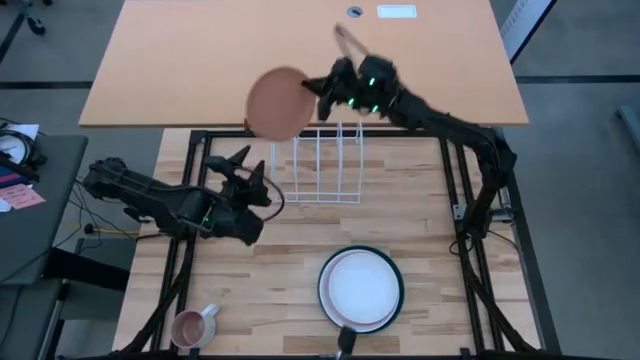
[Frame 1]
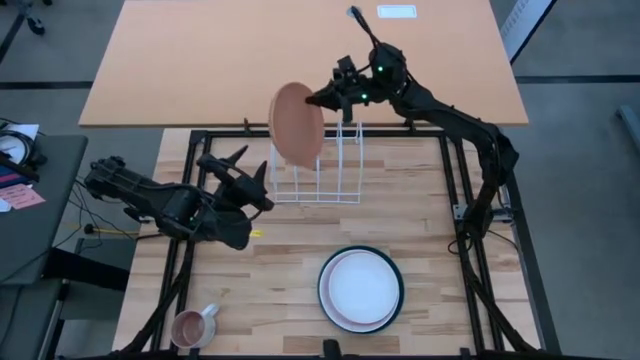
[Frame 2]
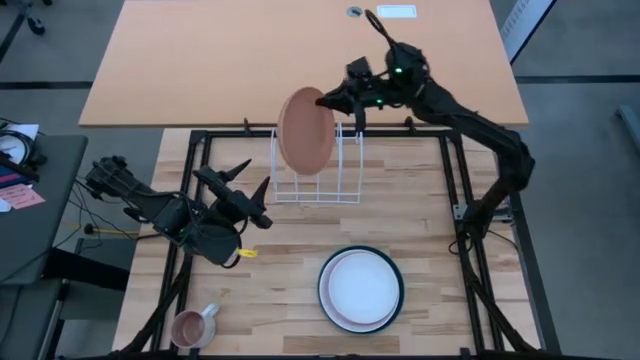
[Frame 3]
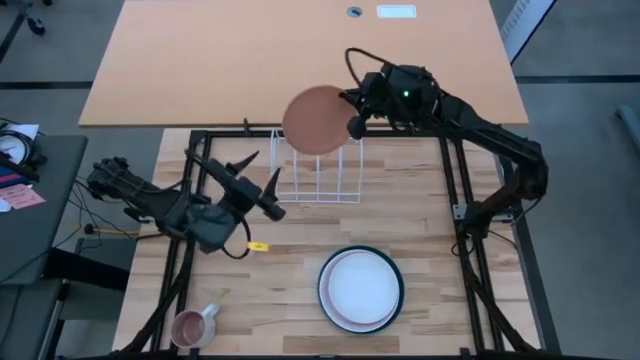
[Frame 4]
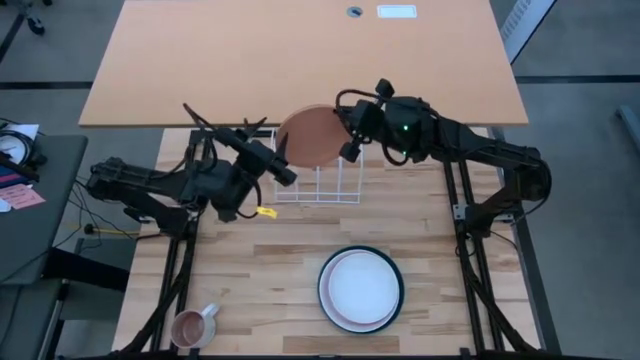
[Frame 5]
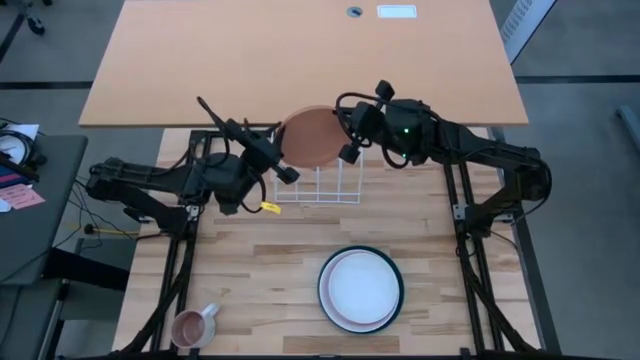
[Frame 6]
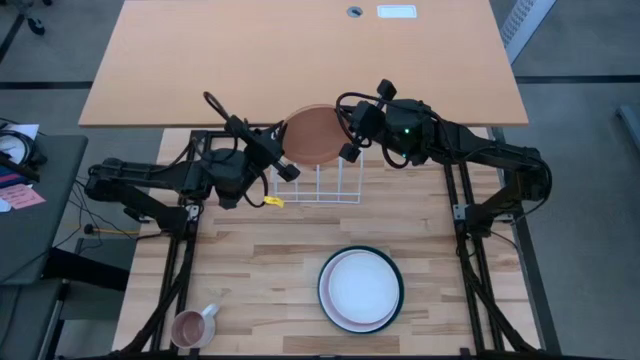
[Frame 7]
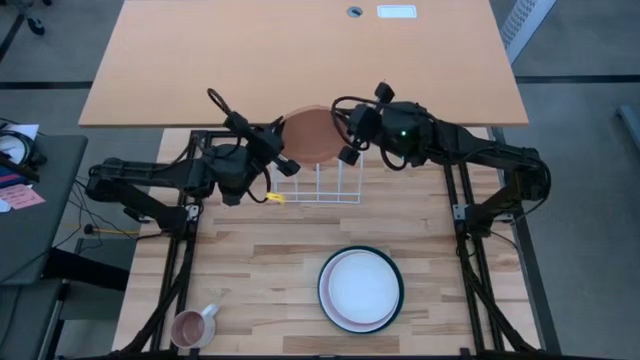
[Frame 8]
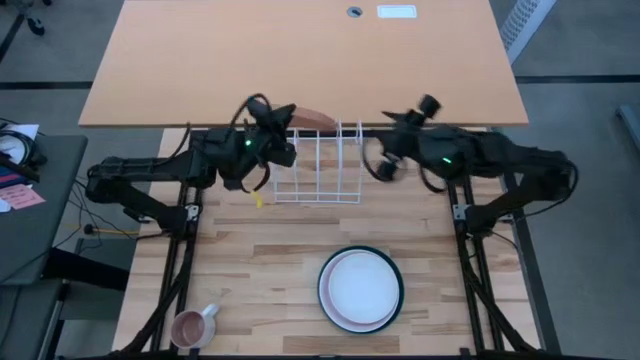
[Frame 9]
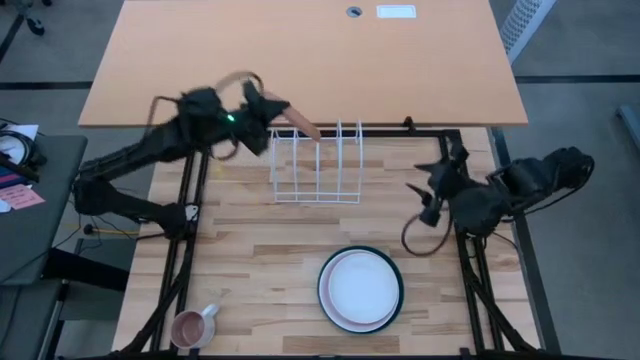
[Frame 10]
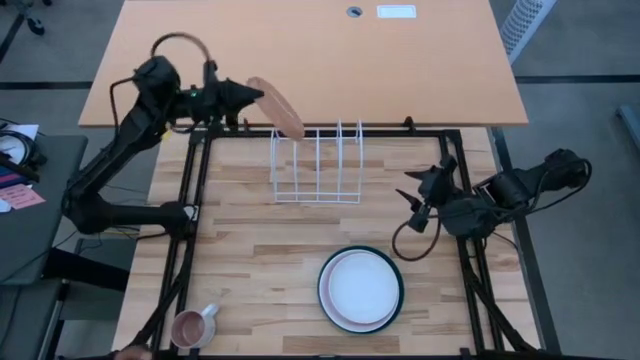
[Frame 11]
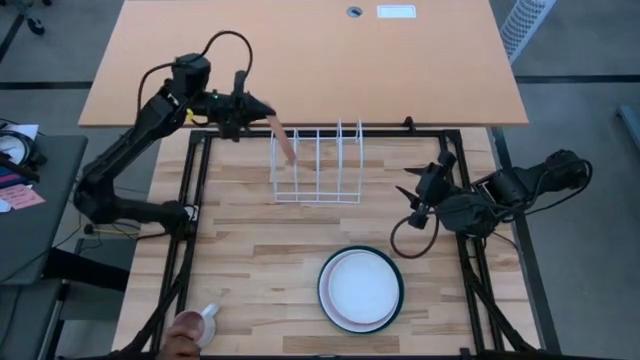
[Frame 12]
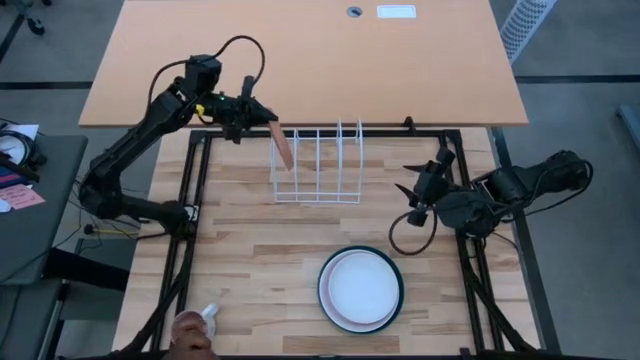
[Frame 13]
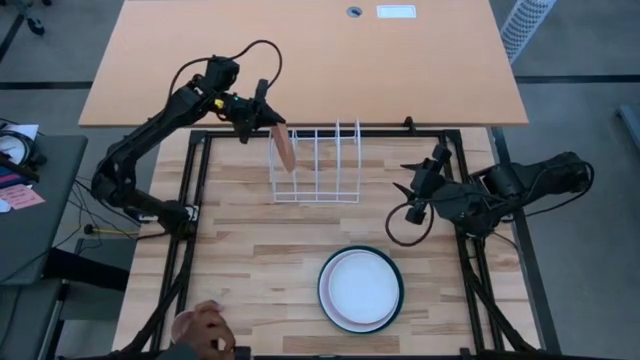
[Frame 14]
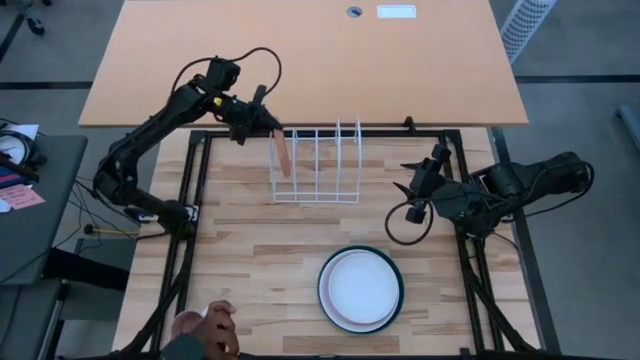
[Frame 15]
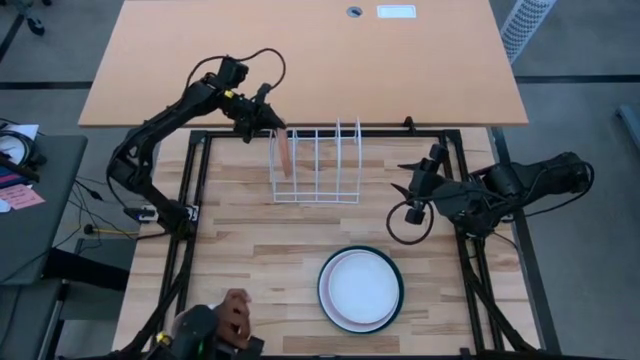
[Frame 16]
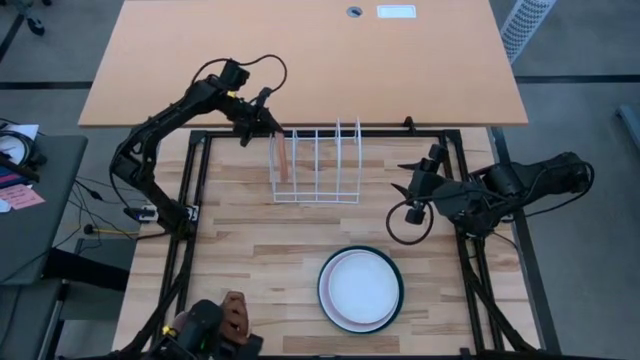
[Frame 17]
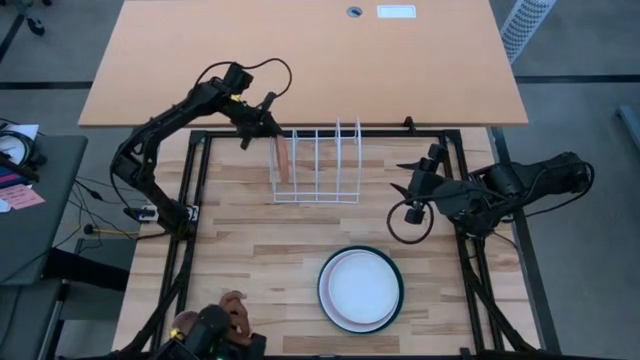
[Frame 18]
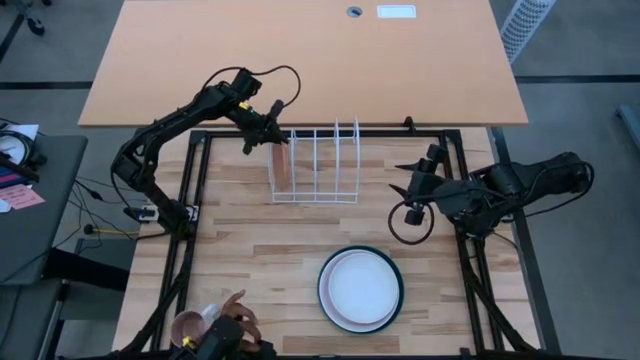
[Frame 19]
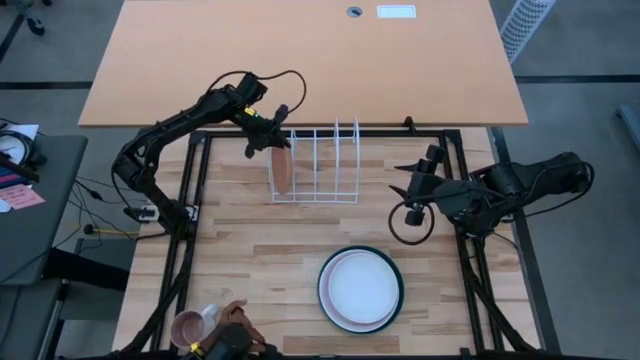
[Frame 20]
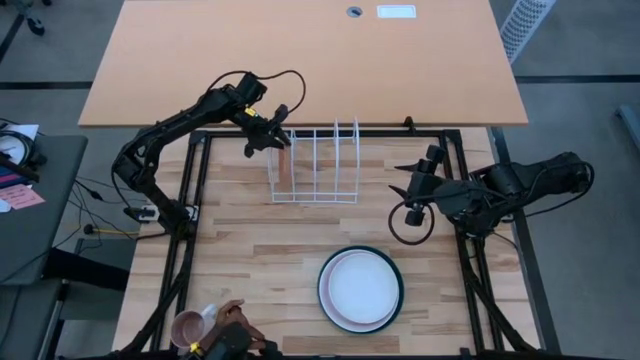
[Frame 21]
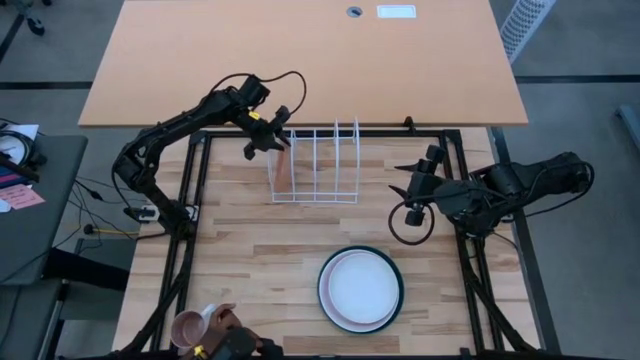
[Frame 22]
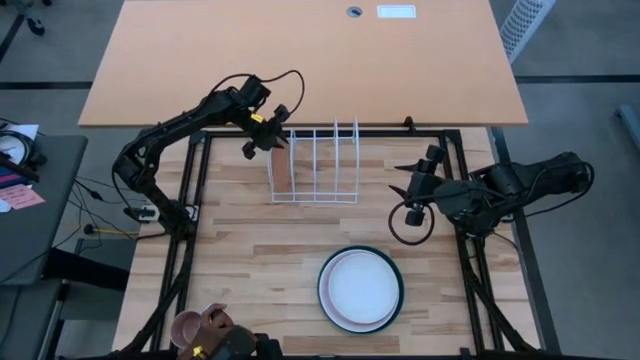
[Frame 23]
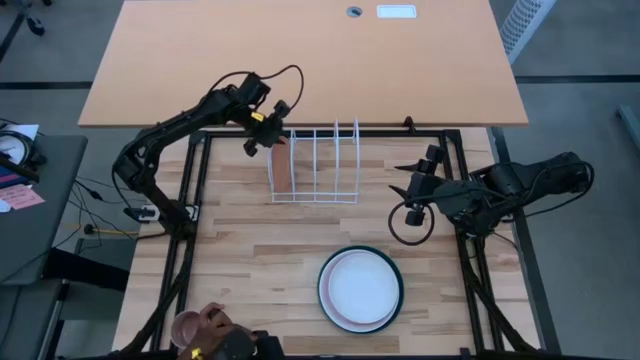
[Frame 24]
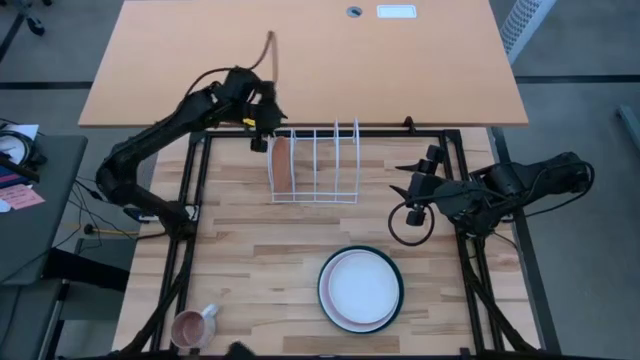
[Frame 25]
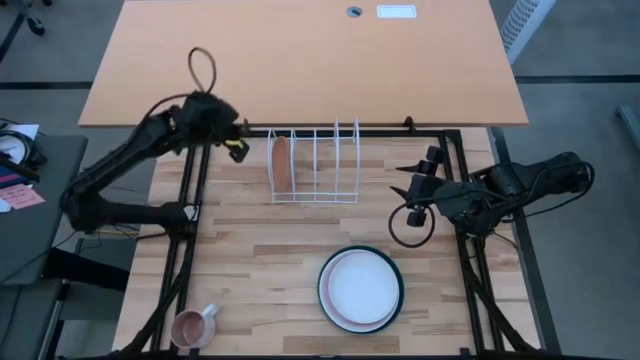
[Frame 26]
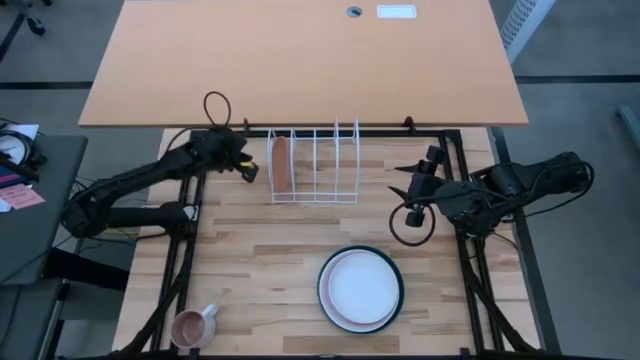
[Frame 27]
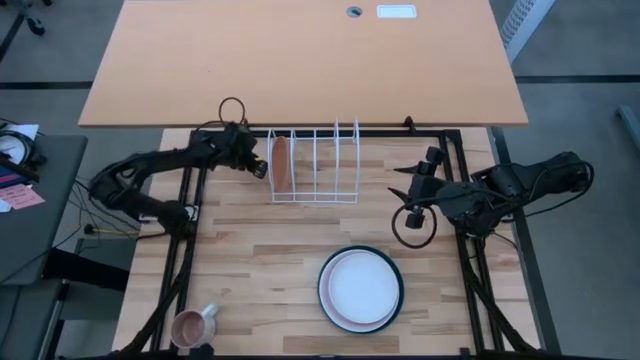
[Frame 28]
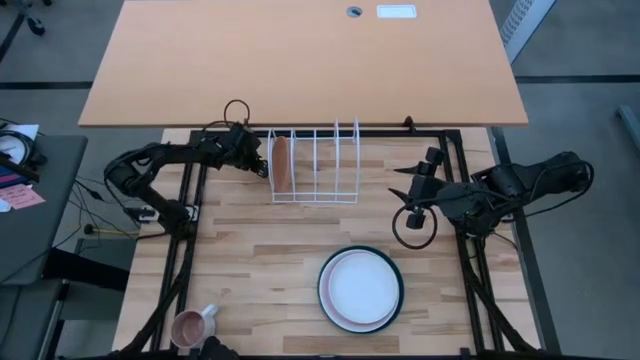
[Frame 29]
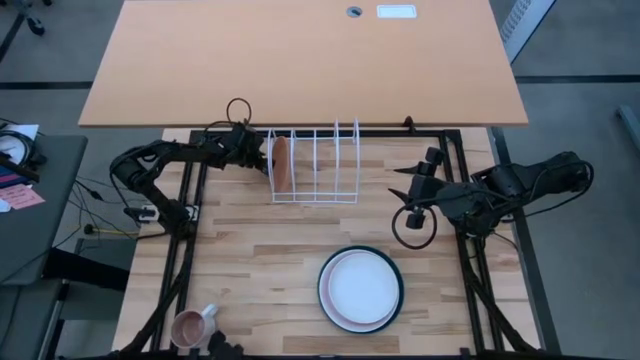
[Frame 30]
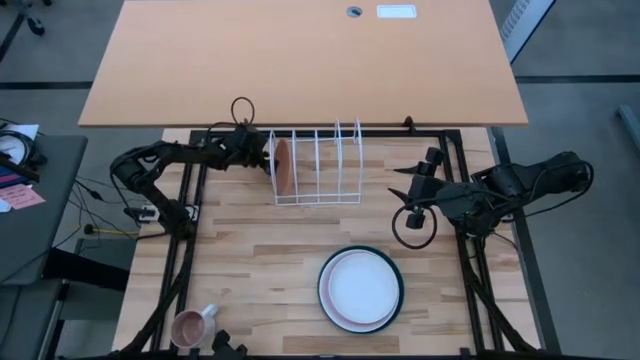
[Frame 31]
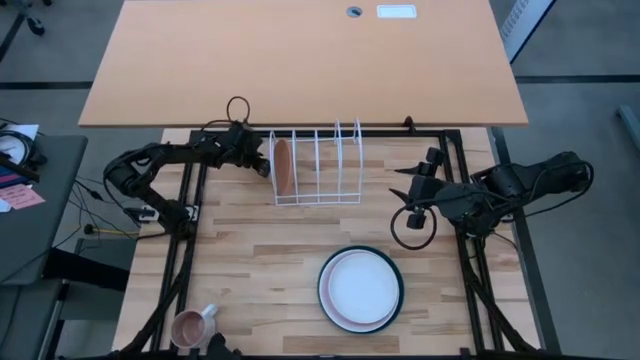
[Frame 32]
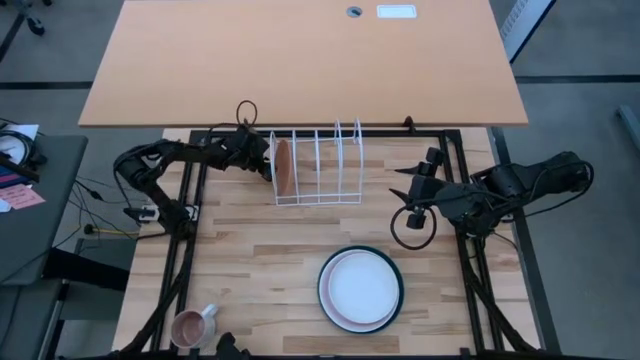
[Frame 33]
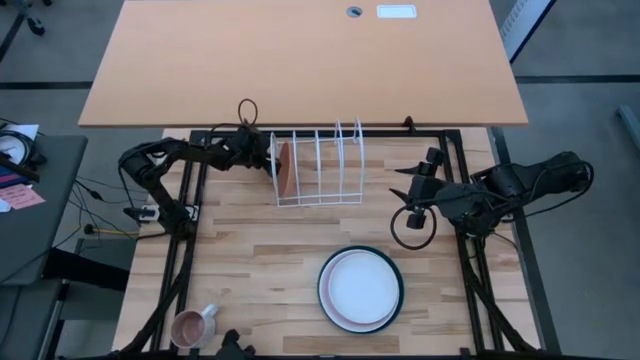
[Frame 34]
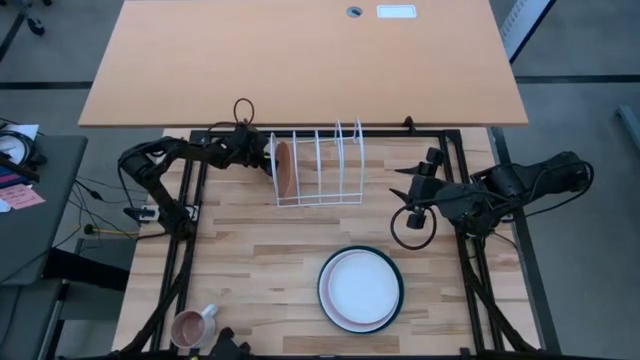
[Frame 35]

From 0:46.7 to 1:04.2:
Task: Sort dishes
Put the light orange plate in the dish rack

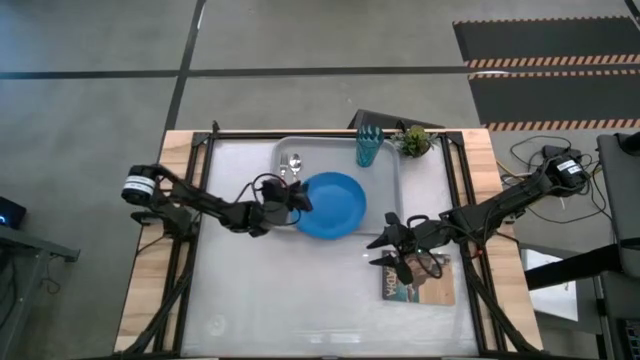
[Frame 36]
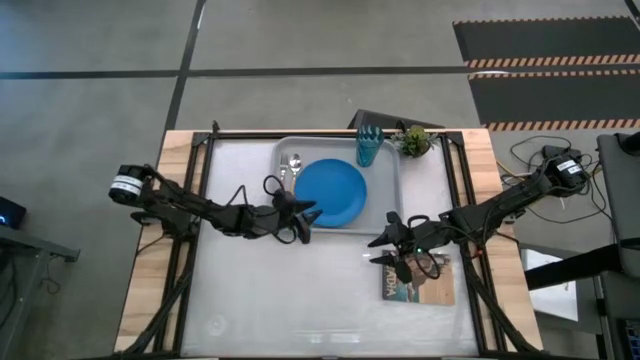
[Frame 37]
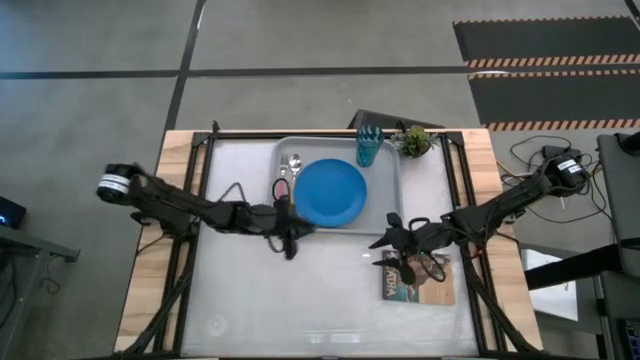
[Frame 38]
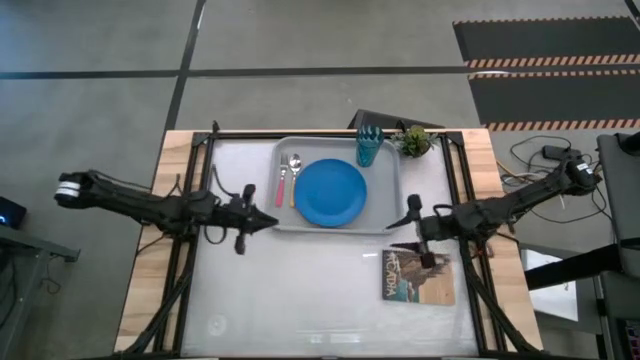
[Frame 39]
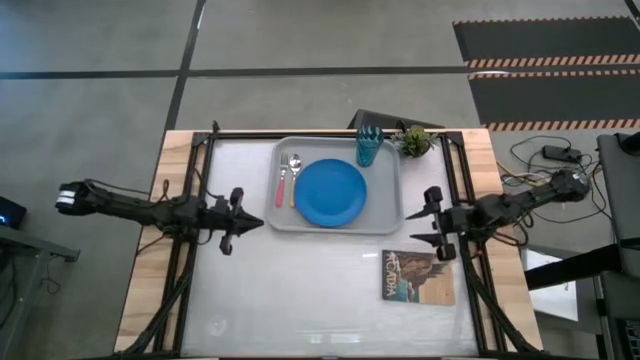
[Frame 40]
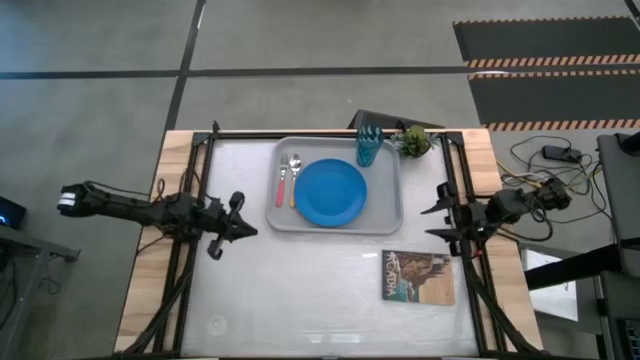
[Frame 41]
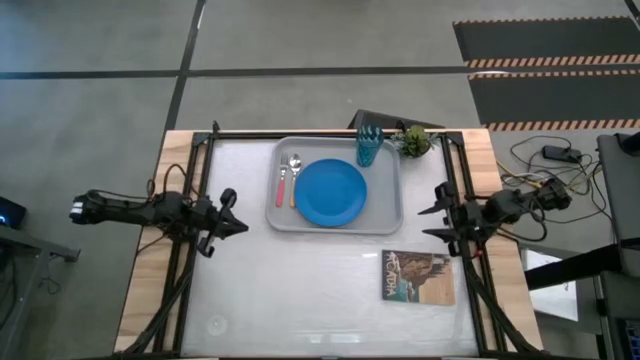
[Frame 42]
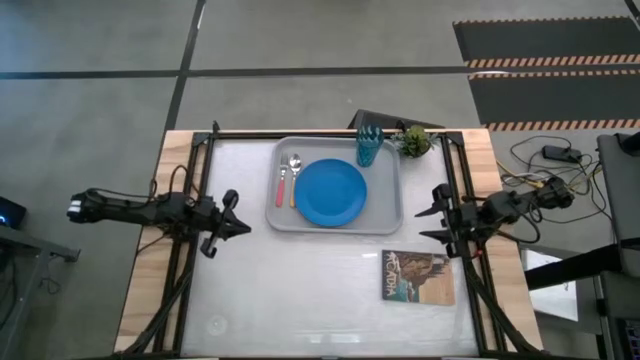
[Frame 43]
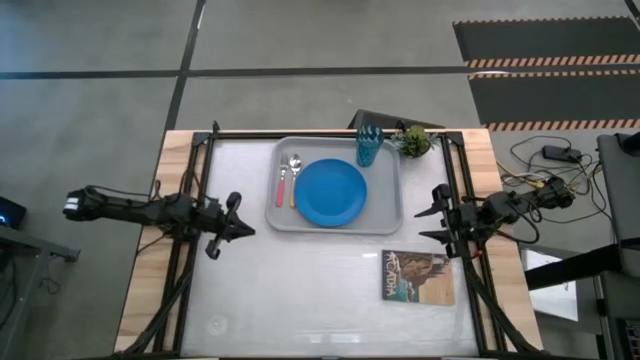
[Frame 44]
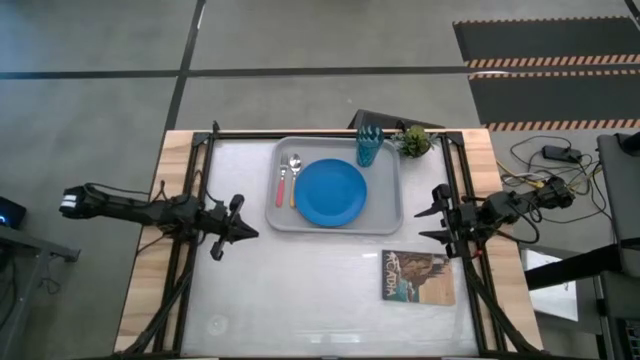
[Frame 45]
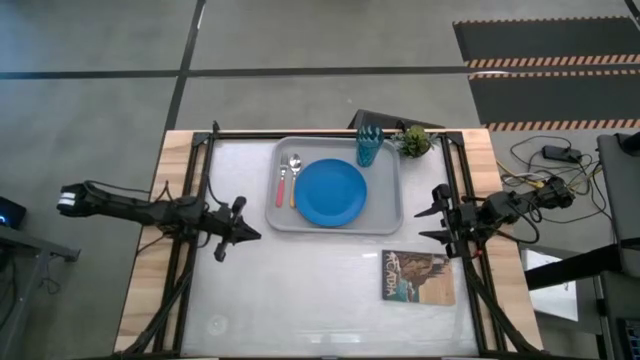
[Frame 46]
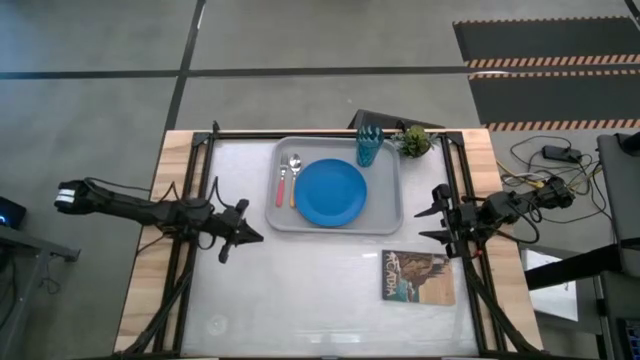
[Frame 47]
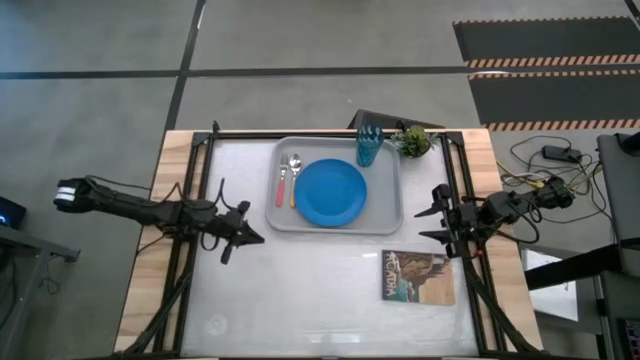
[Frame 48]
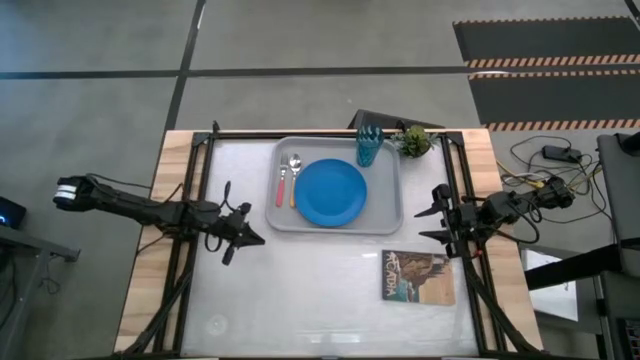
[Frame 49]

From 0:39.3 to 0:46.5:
Task: Pick and place plate/cup/fork/spoon on tray
Return to Home Position
